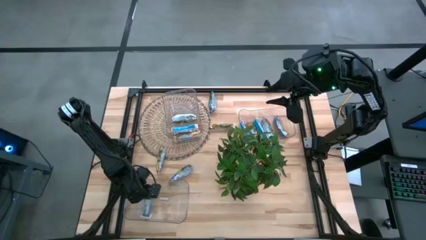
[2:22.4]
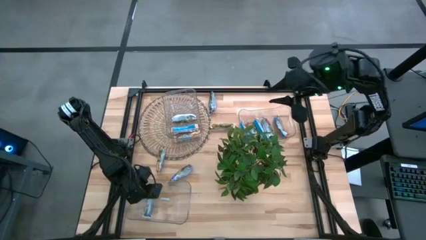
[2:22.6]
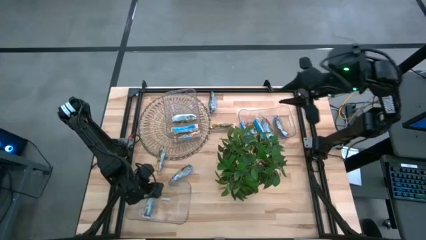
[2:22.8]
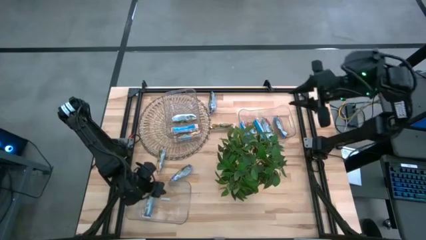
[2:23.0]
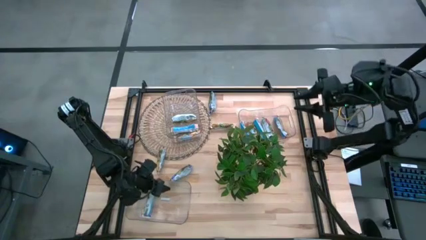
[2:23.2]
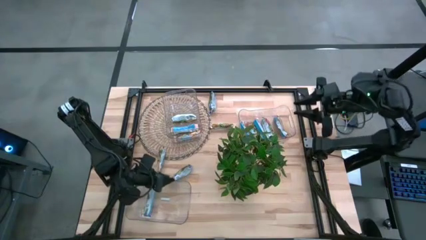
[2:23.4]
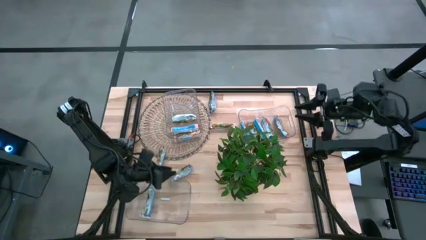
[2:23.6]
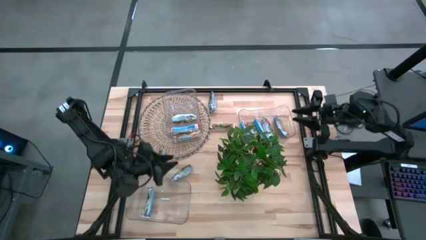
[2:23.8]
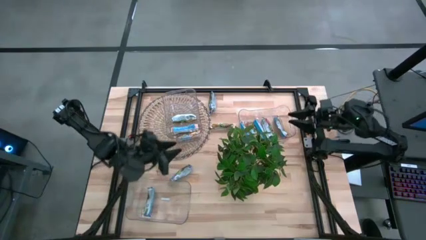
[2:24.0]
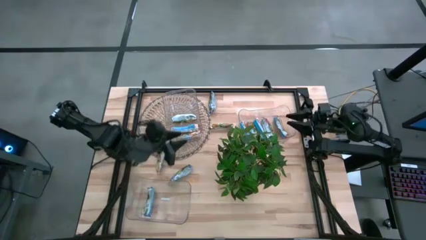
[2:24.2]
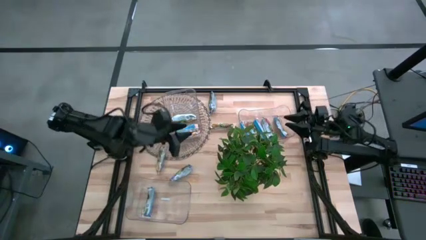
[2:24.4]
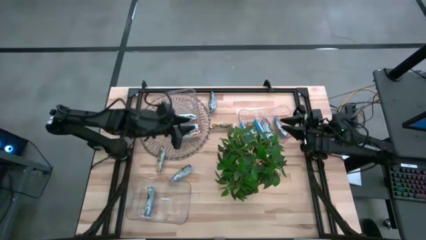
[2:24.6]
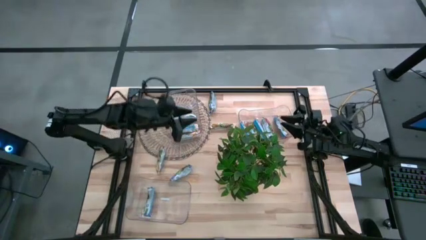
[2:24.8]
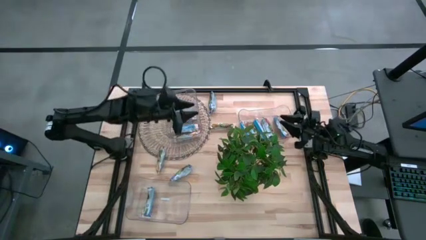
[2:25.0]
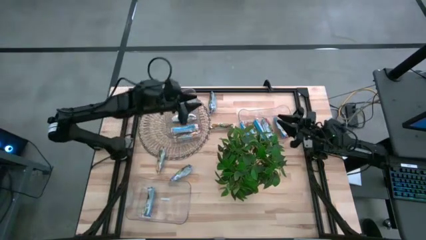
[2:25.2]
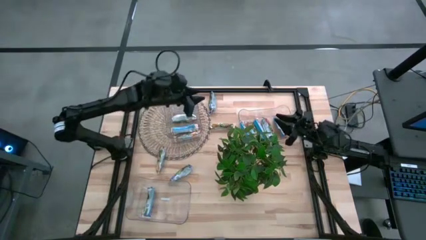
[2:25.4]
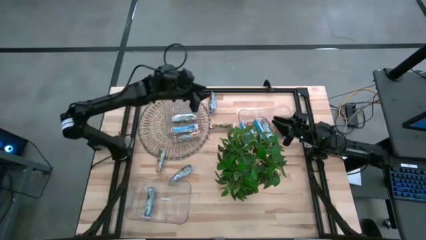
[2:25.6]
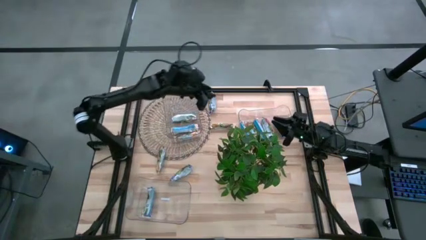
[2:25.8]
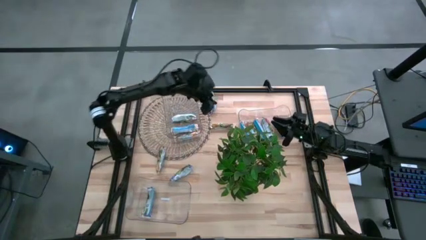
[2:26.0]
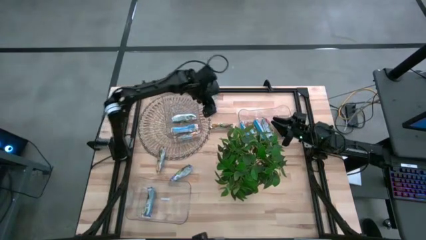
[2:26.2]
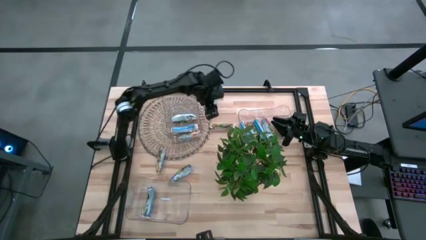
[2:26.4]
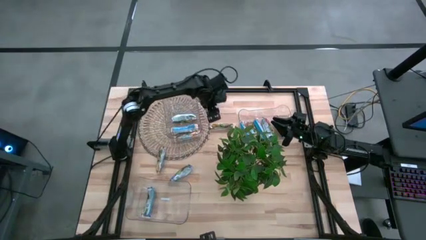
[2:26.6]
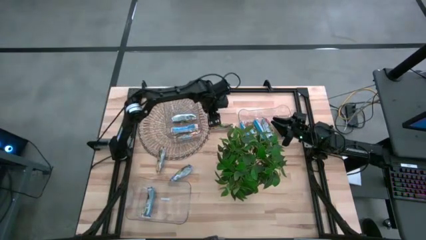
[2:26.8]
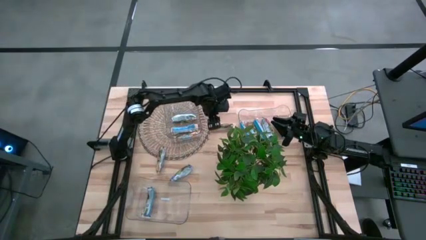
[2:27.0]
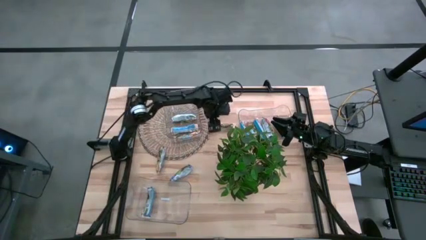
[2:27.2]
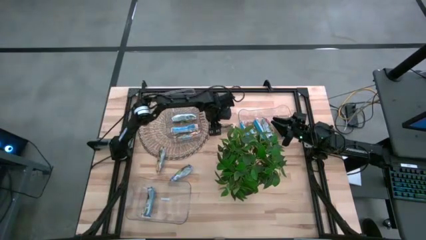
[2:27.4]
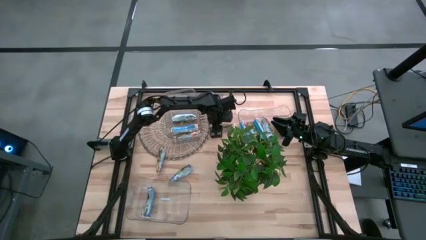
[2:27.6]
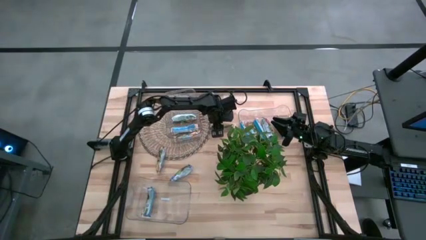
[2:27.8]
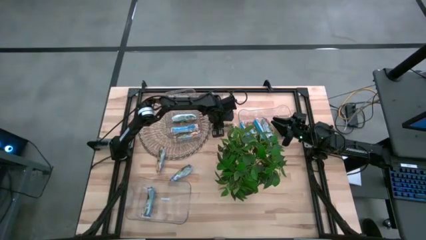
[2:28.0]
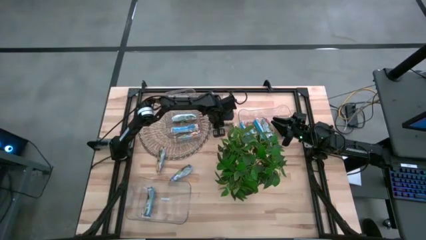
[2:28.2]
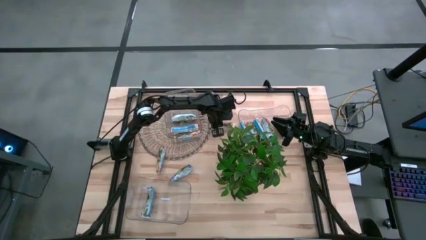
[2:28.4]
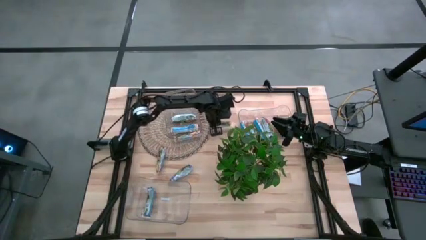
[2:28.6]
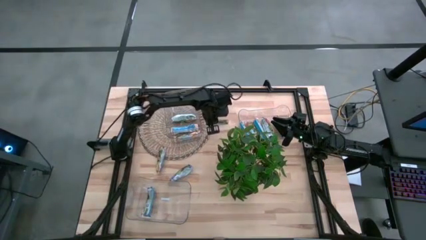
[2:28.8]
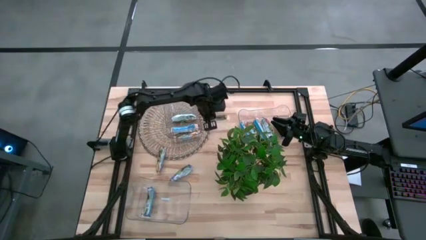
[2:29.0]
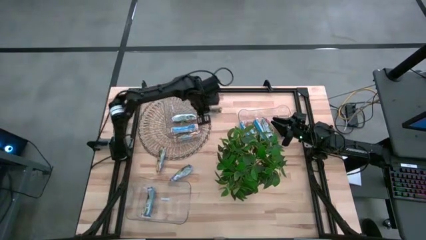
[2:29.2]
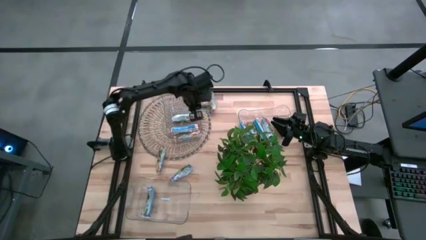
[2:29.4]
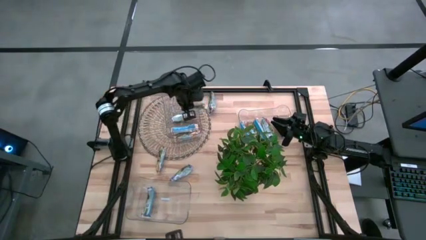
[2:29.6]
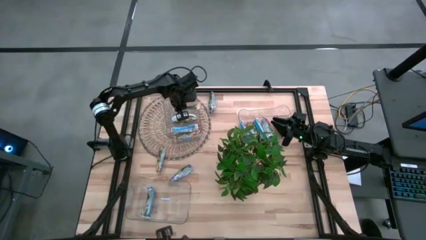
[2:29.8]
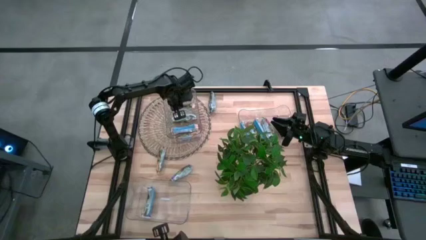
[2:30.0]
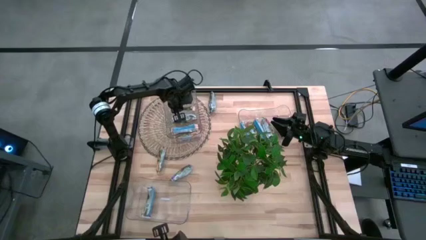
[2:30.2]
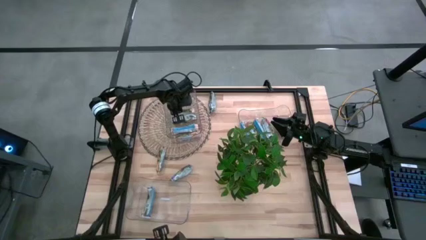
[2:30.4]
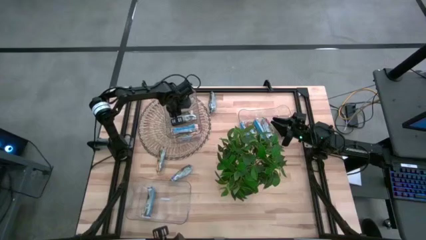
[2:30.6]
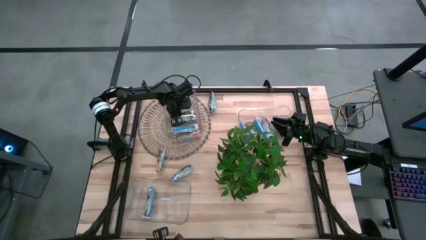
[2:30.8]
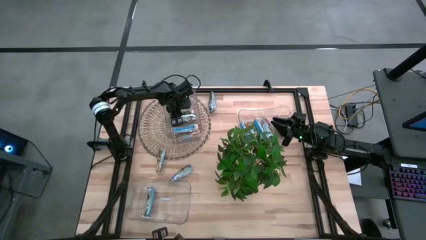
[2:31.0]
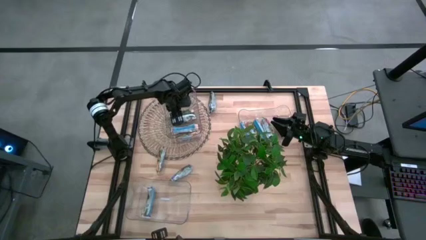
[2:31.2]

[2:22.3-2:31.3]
Task: Pick and place Granola Bars by type
Put the right yellow granola bar into the top left transparent bin

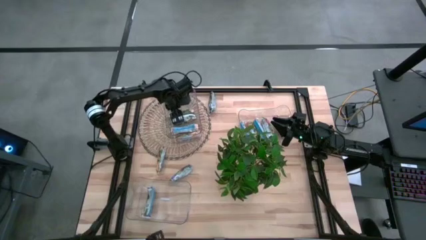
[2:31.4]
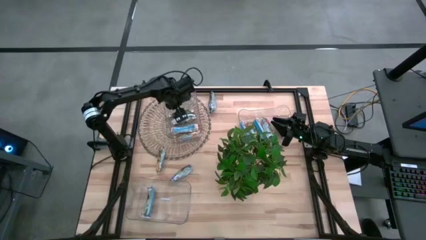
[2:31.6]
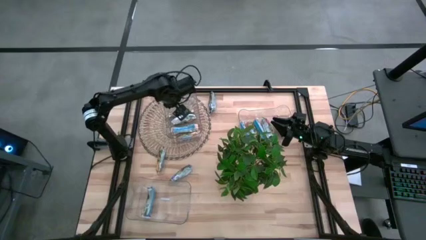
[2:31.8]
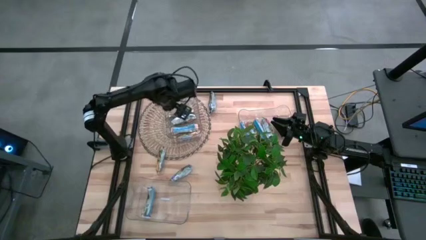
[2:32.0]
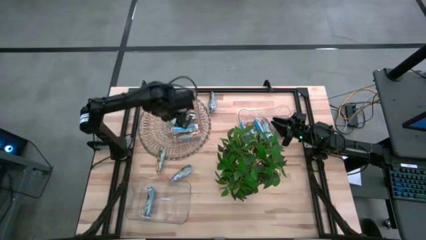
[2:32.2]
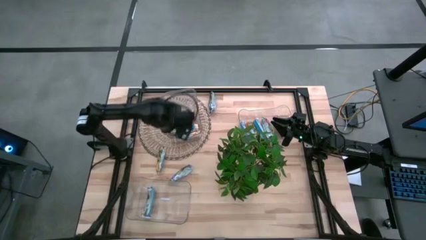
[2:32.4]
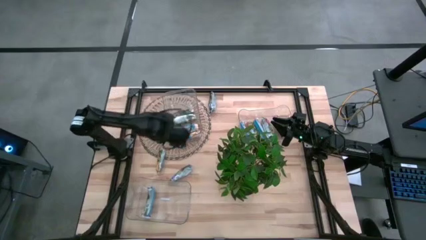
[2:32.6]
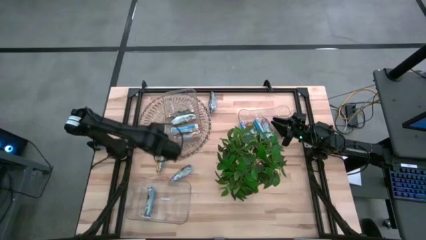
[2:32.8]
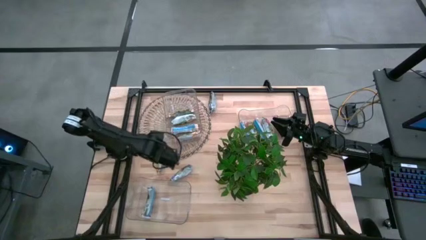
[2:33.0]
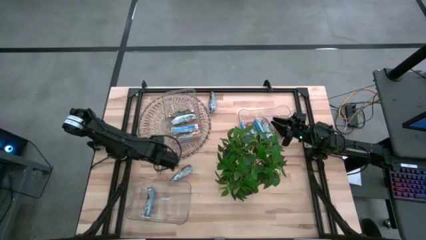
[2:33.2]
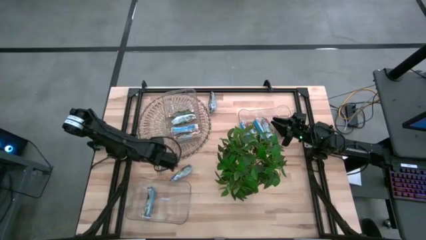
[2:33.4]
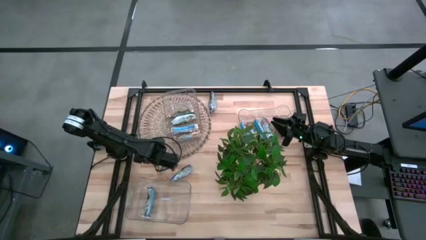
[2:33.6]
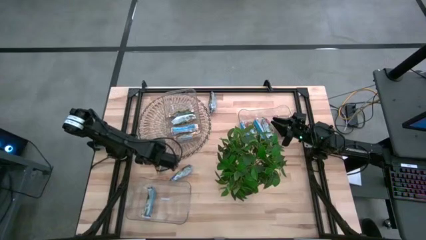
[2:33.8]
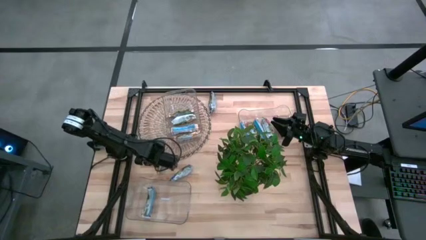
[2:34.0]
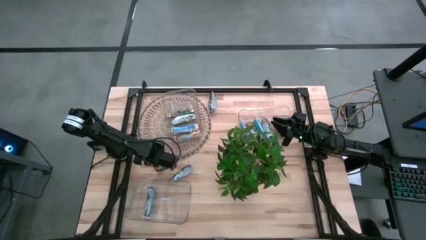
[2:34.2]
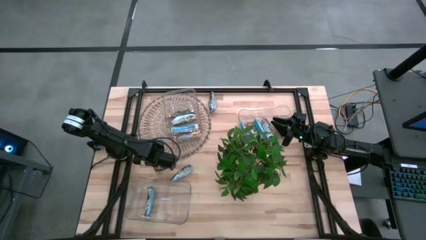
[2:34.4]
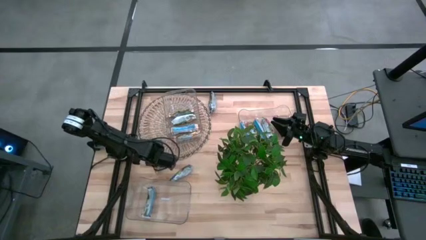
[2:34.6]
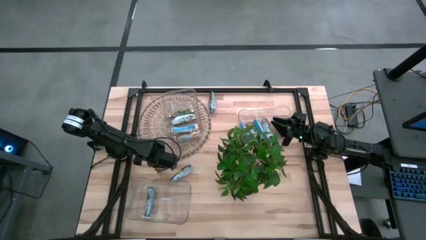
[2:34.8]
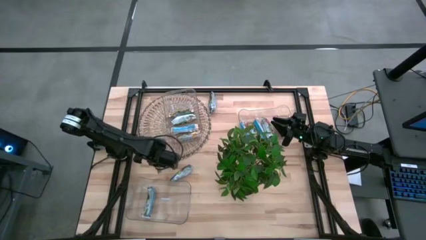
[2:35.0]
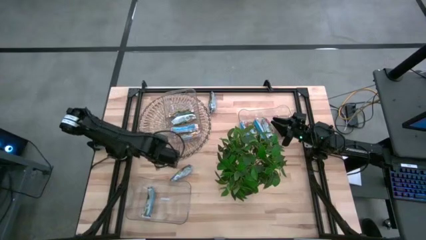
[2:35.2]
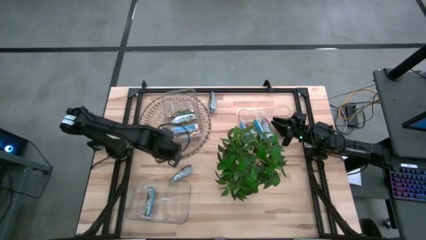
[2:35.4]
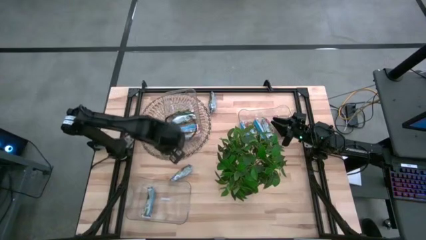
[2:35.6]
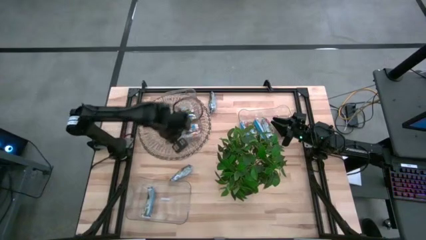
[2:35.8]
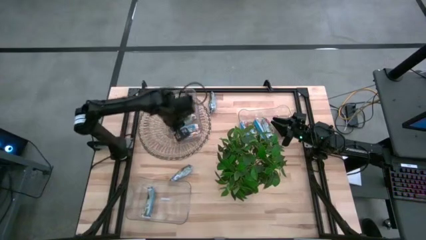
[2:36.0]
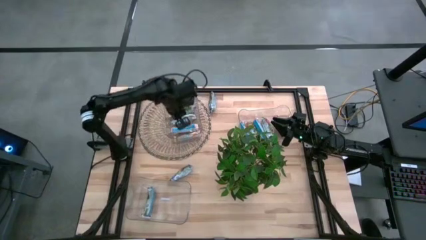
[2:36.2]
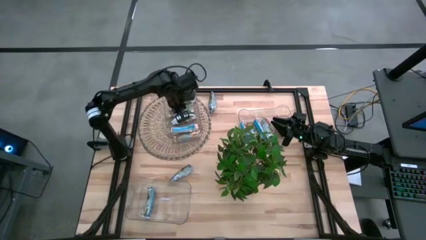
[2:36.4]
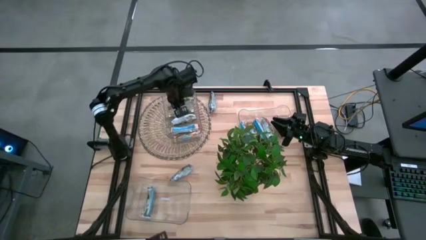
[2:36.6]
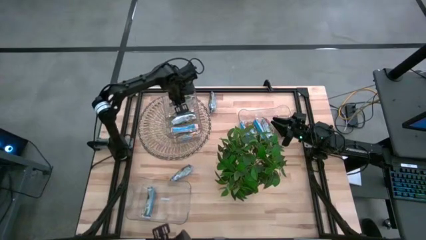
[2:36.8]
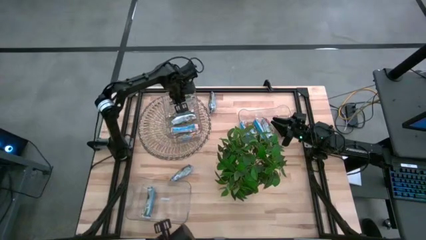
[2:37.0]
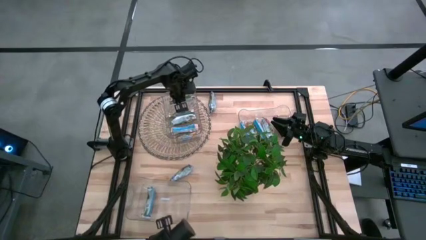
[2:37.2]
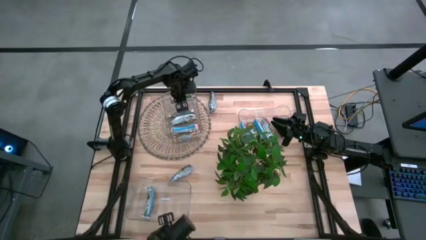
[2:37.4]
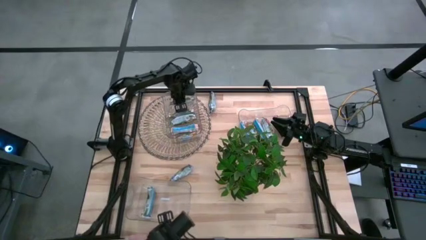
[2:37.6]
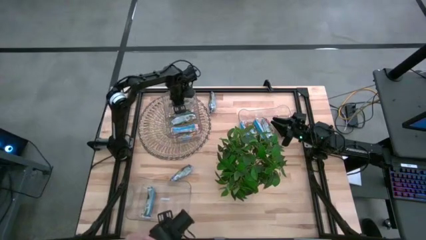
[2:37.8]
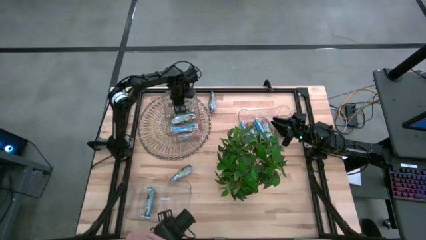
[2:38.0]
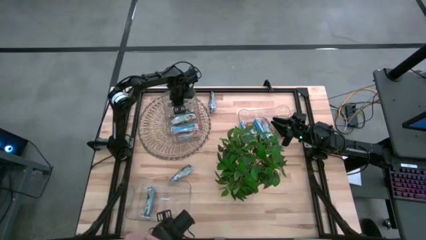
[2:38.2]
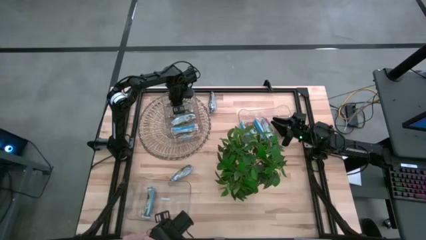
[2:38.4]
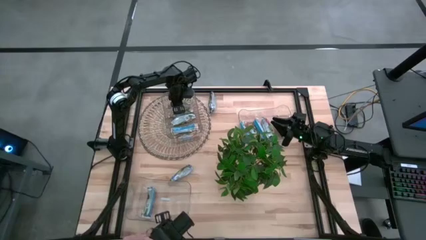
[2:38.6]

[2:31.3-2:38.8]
Put the yellow granola bar into the top left transparent bin

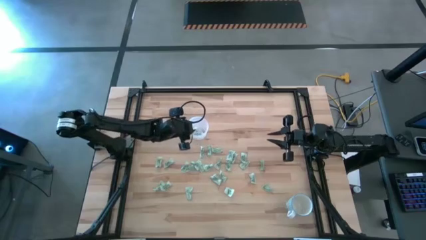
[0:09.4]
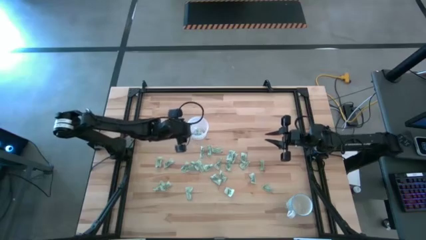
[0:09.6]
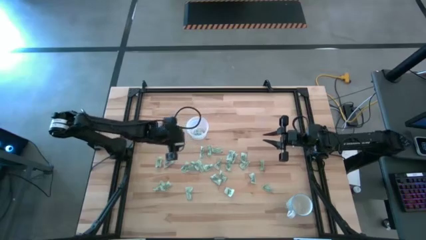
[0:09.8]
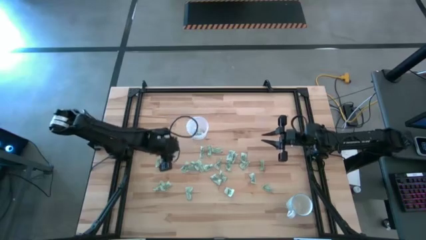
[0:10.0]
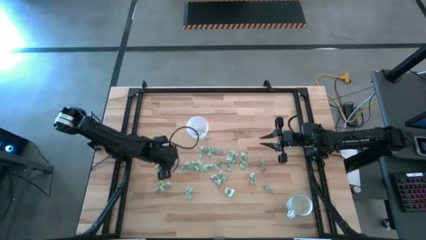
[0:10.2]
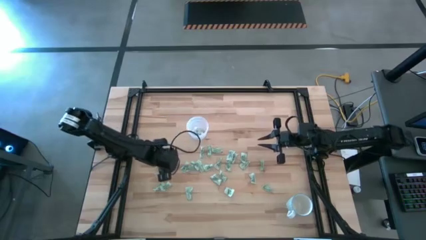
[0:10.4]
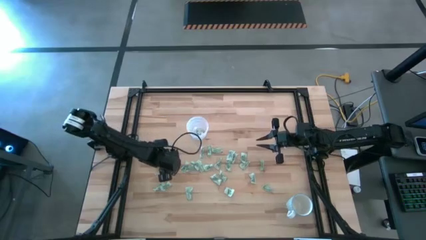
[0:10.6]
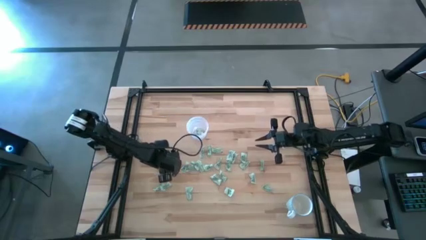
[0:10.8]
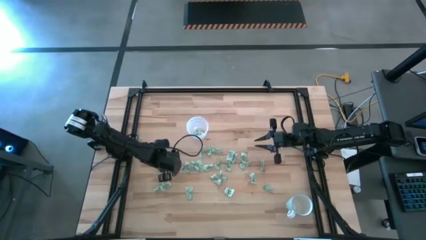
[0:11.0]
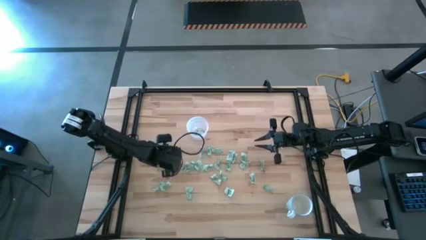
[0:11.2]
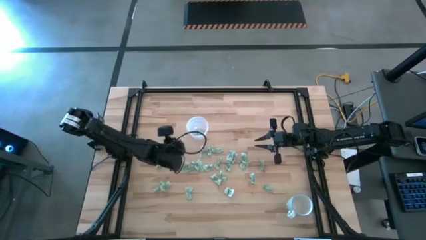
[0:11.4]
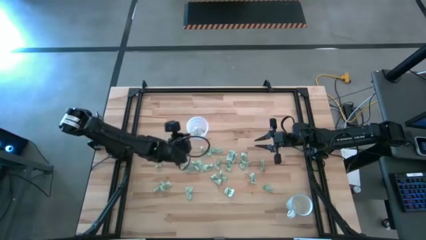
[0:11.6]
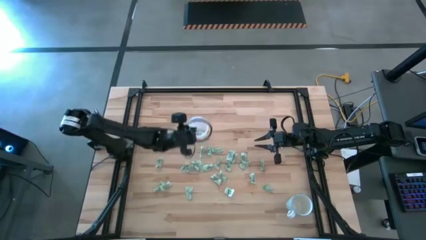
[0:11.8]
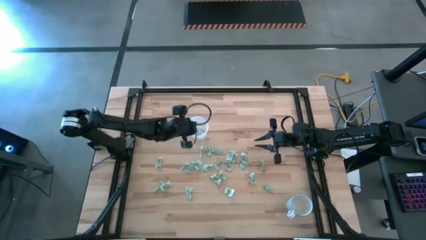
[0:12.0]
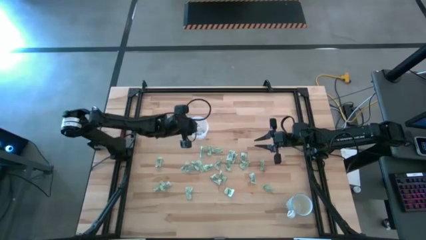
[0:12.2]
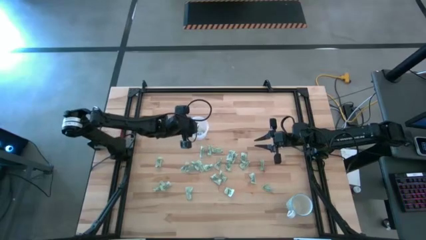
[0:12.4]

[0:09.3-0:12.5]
Task: Pick and place Stevia / Truvia into bins
Put the stevia packet into the transparent container
